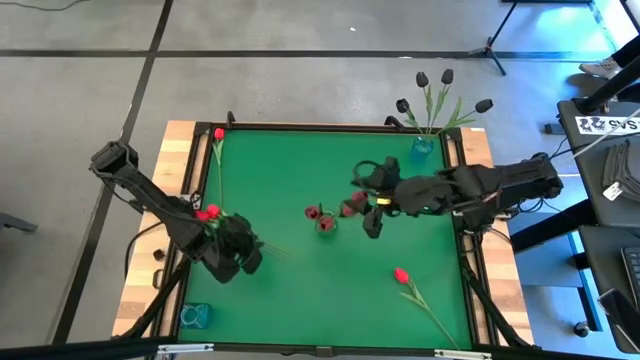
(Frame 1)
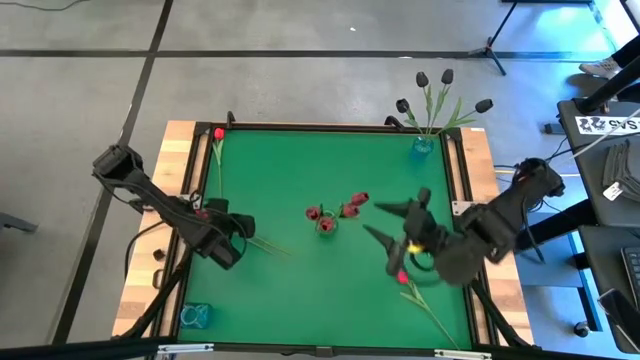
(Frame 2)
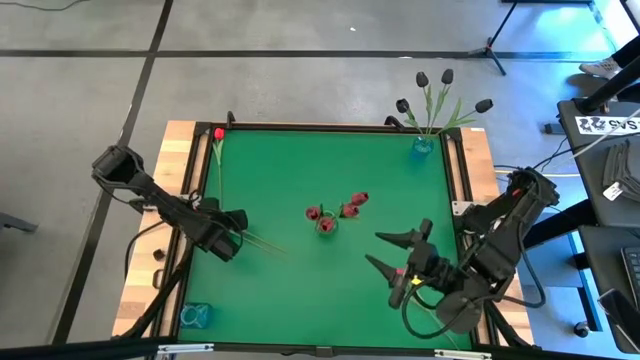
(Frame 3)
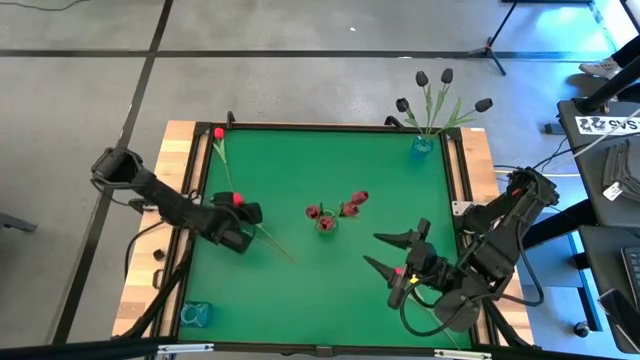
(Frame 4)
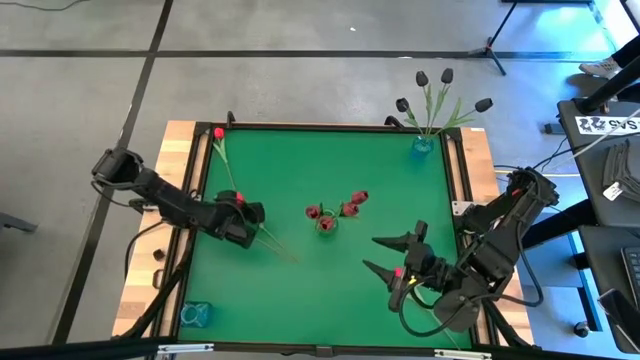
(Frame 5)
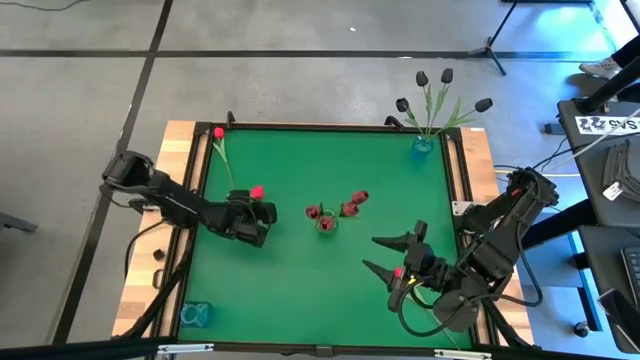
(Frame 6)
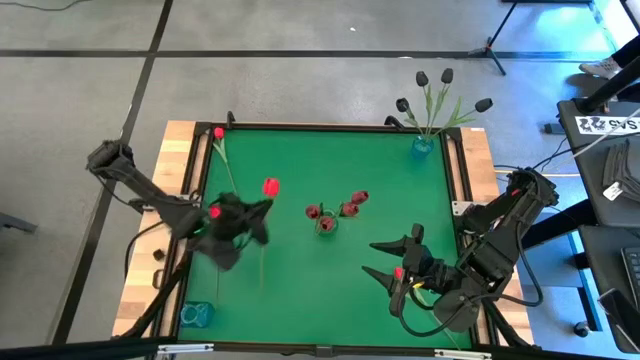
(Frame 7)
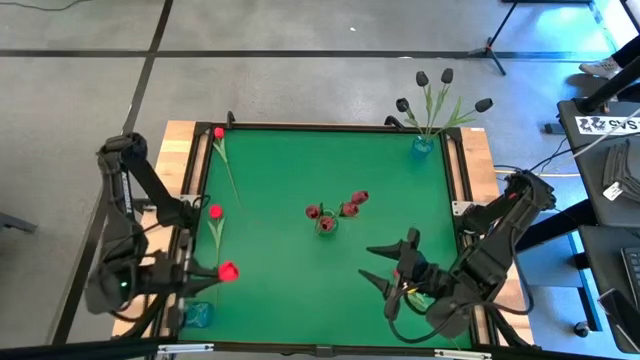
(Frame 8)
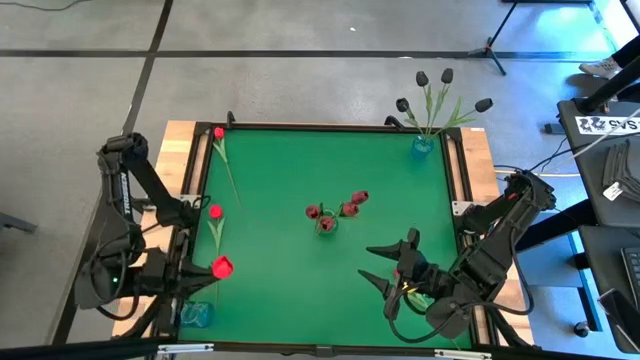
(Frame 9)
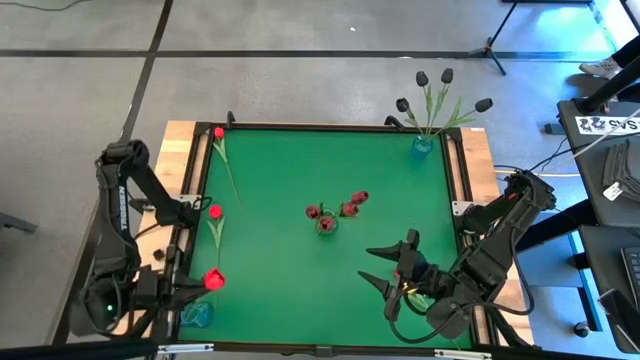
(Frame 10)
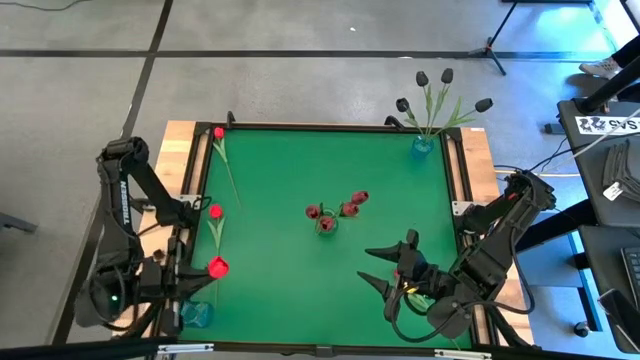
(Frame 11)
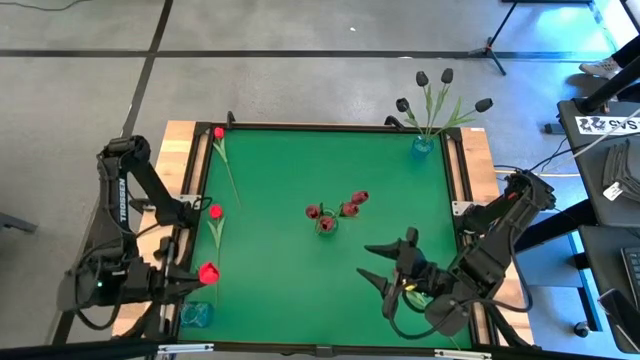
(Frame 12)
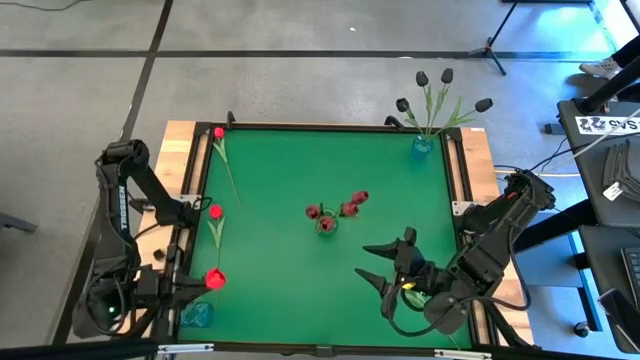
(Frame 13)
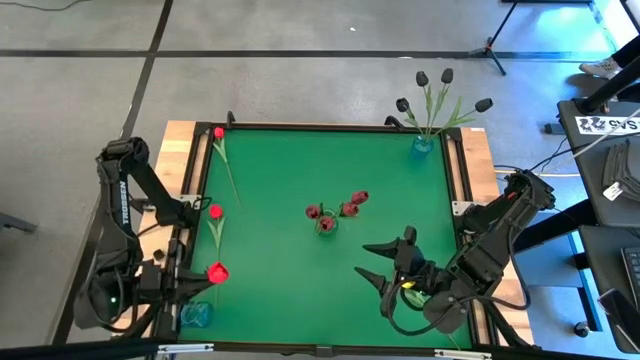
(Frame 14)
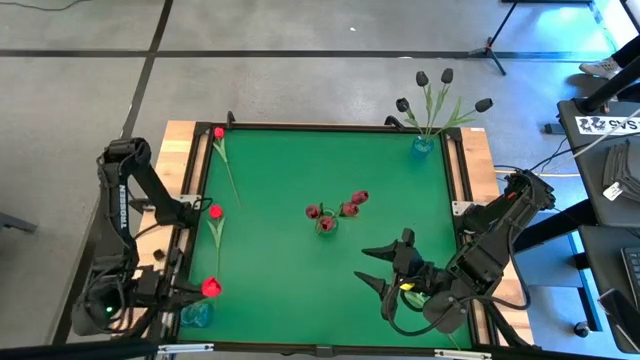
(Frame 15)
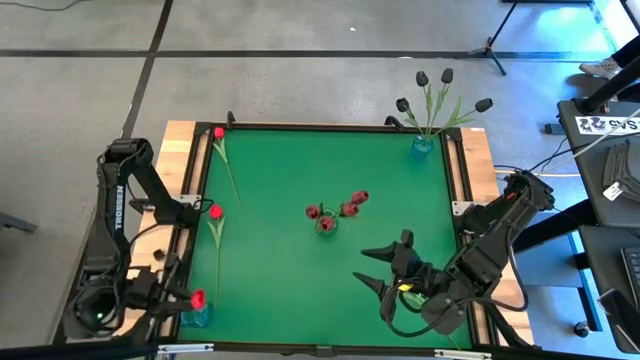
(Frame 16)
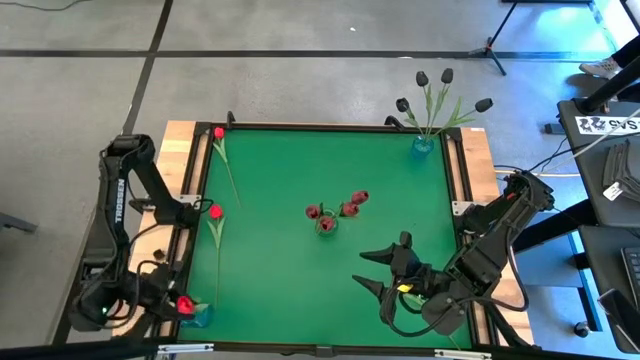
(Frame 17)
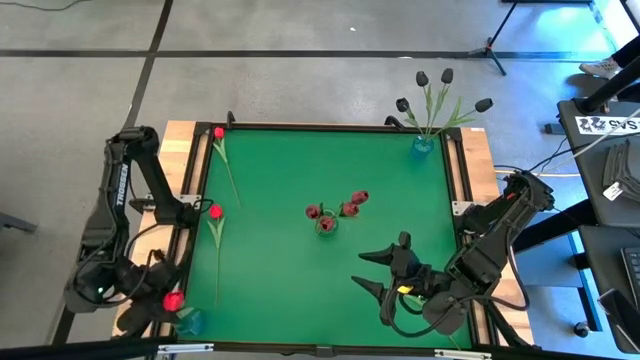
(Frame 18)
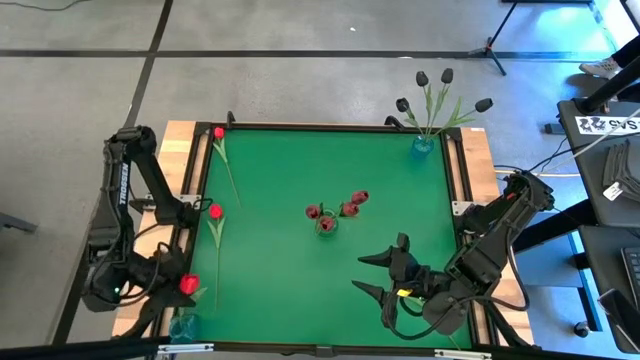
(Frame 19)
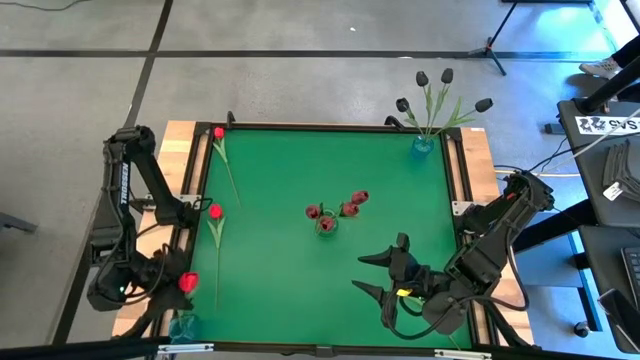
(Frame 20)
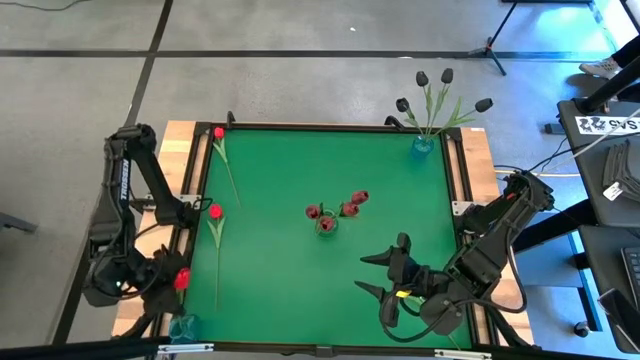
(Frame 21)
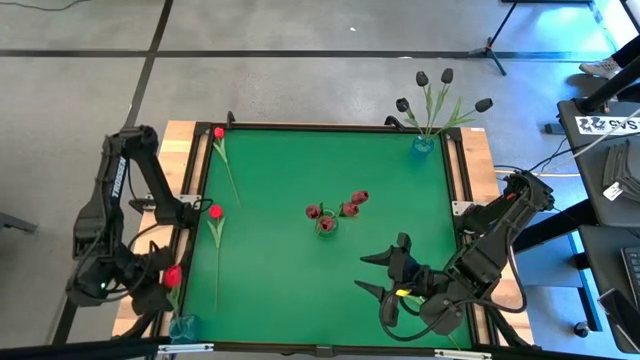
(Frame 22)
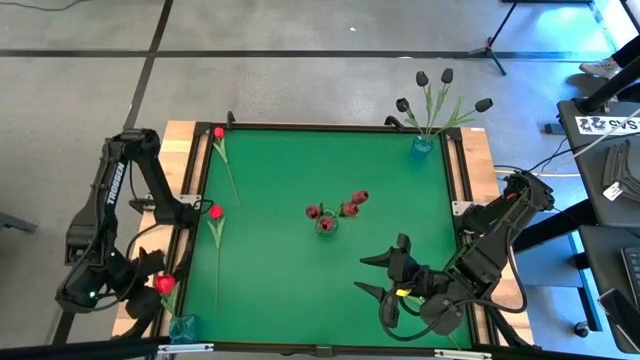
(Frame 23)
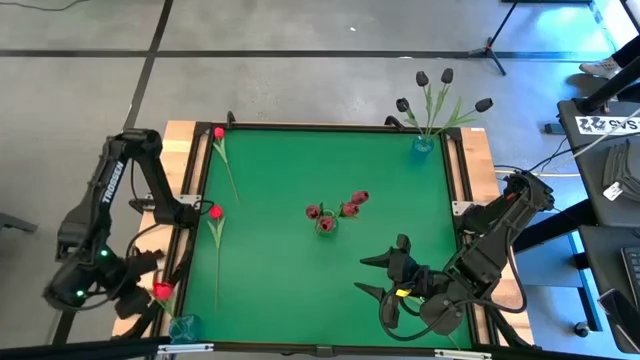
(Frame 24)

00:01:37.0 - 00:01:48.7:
Task: Sort flowers into vase by color
Put the middle left red flower into the bottom left blue vase

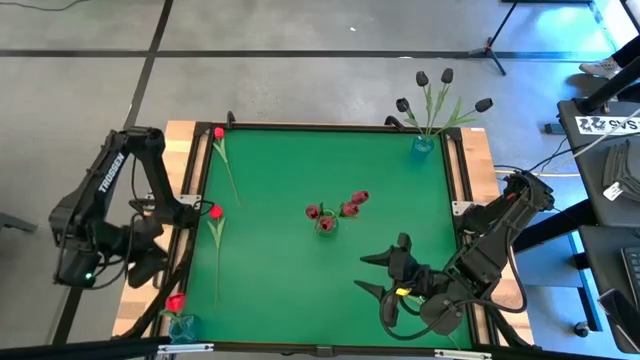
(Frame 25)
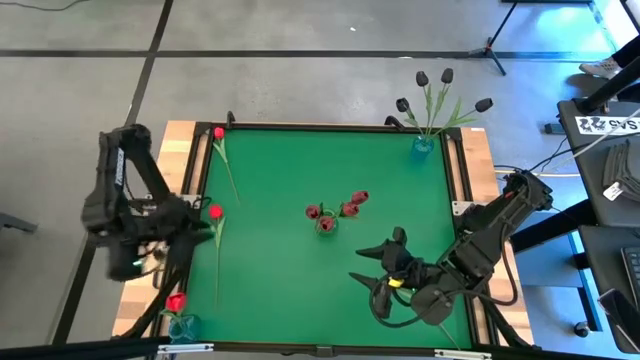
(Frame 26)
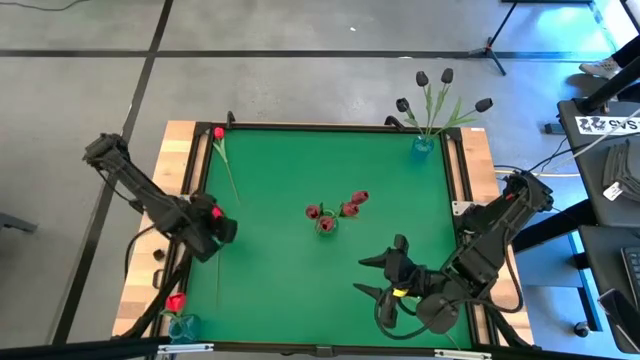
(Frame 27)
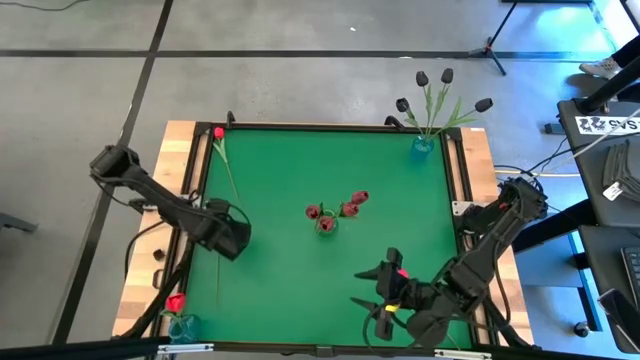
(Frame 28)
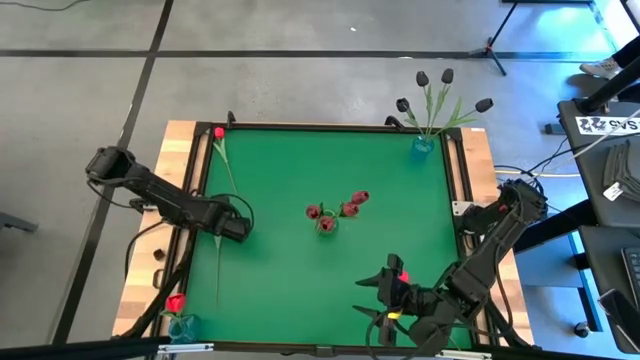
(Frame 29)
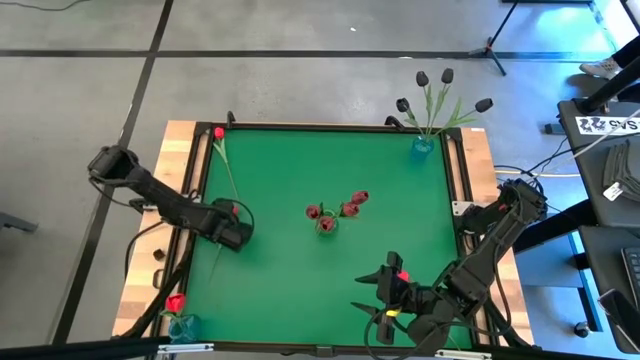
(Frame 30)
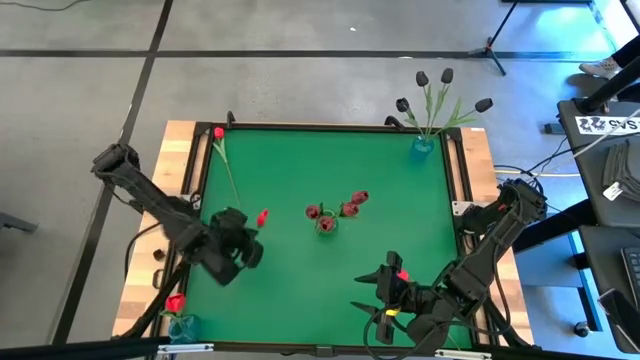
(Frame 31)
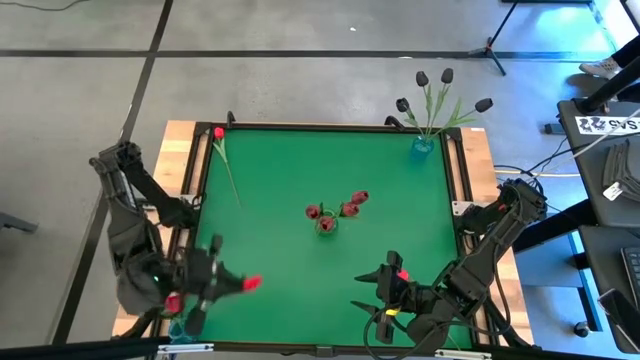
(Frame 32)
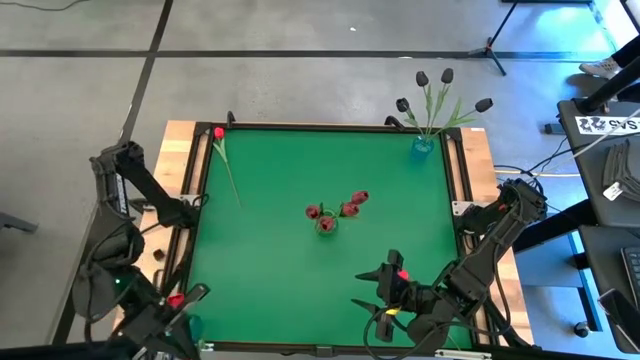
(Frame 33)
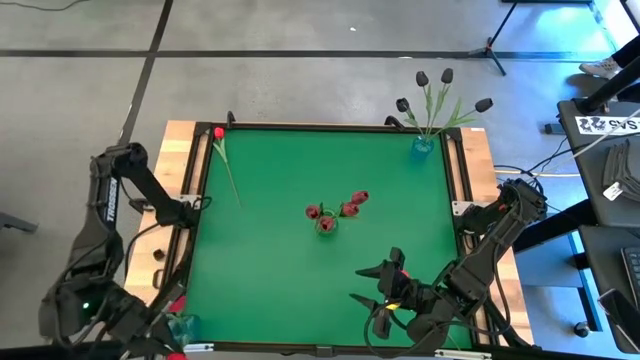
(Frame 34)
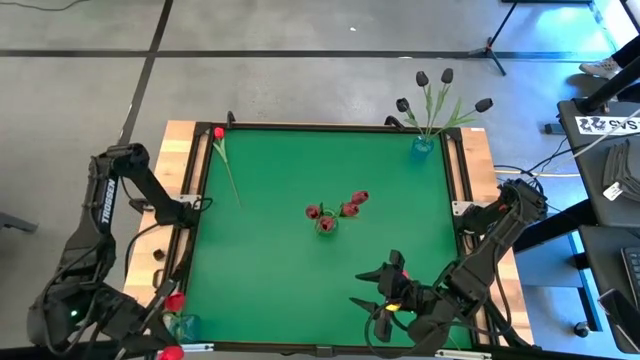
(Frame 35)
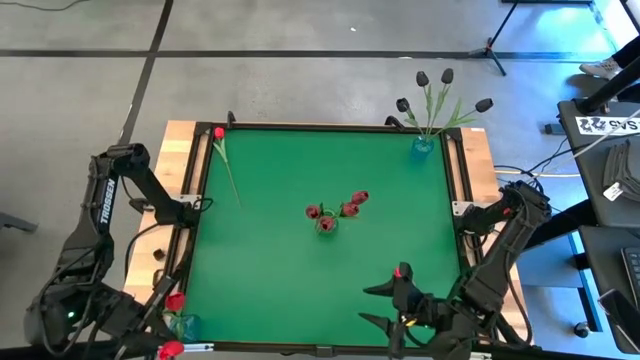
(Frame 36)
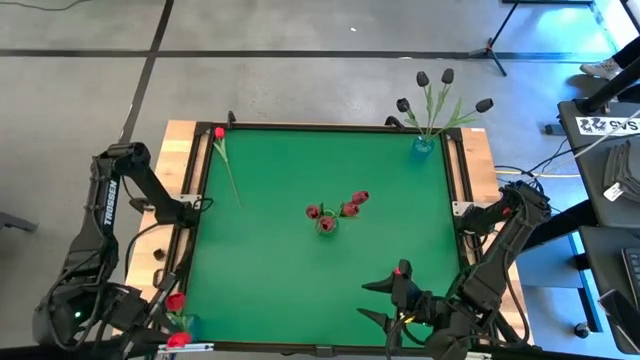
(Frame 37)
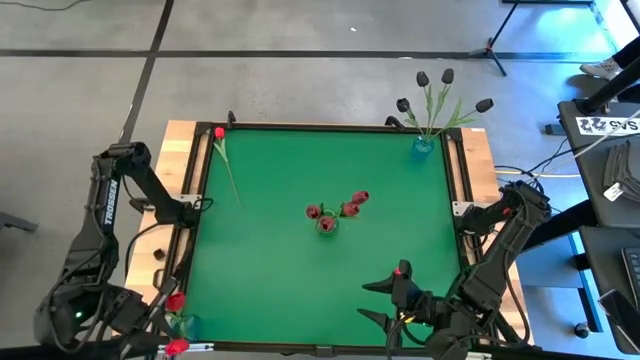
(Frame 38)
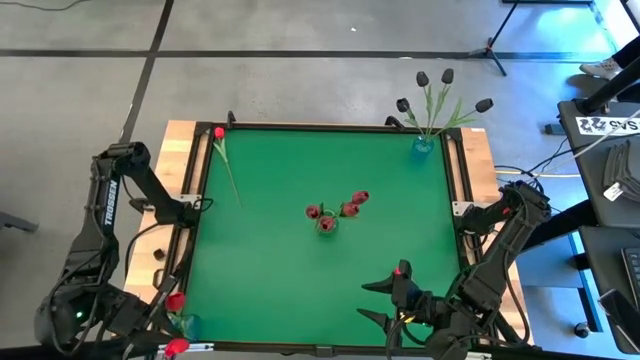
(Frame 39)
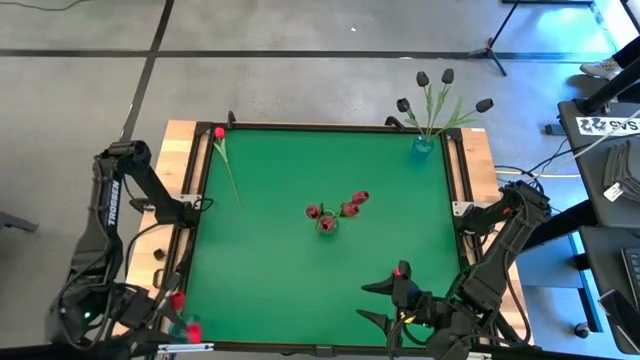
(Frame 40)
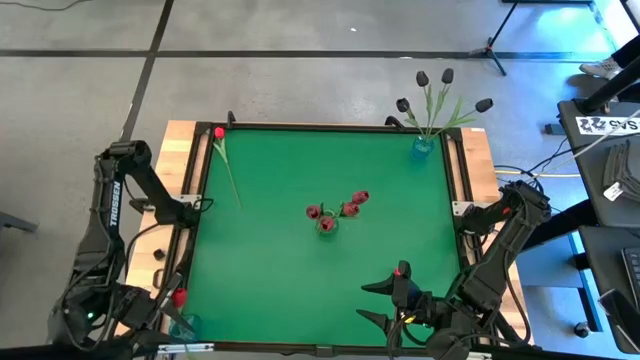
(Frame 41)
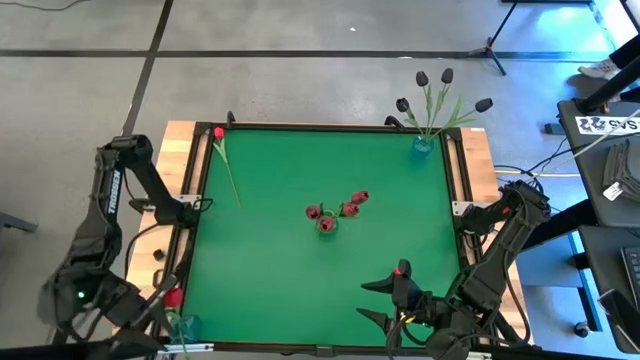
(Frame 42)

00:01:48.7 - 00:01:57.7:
Put the bottom left red flower into the bottom left blue vase

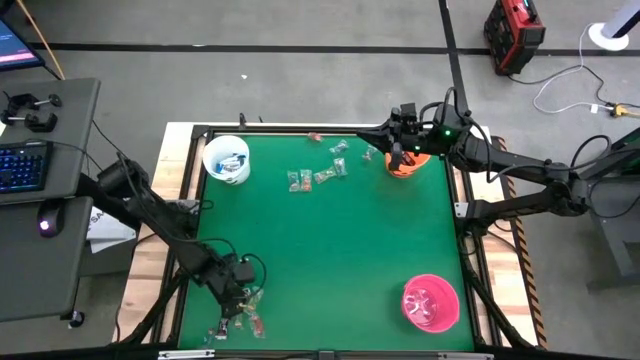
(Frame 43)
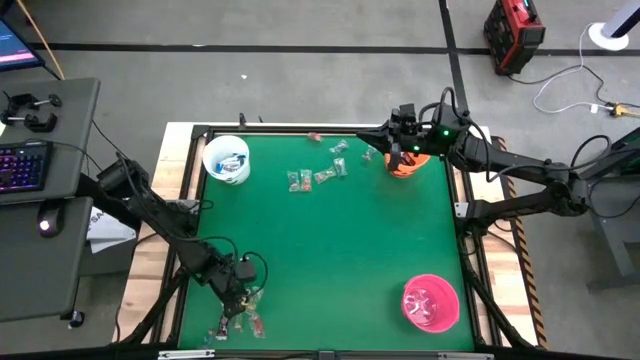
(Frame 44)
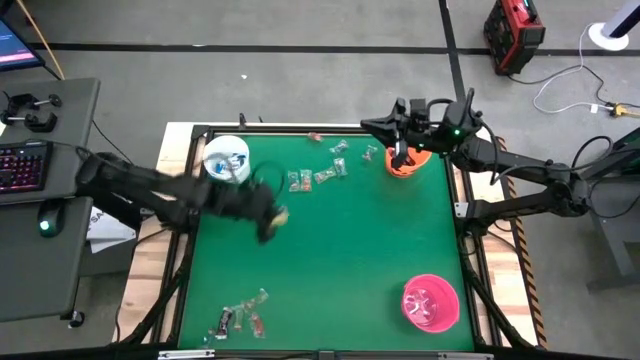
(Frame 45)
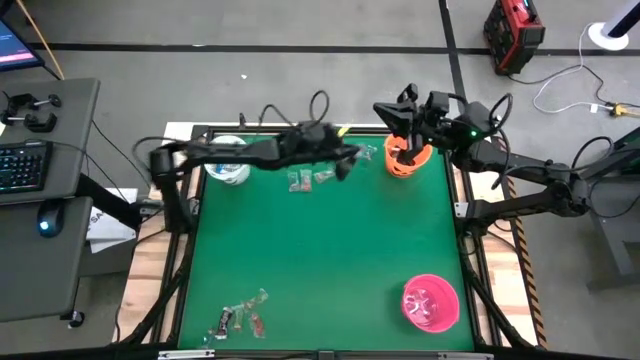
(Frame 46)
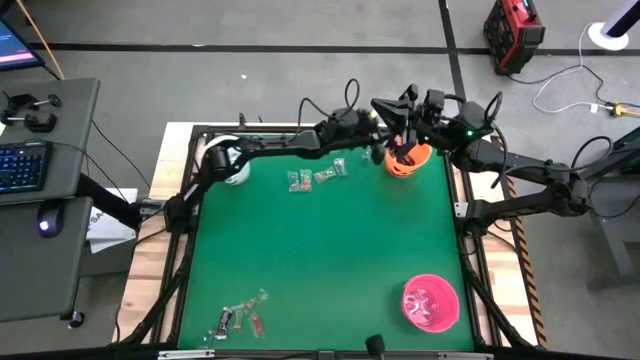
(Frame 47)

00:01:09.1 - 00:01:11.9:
Task: Sort candy by brand, put in halloween buckets
Put the brown chocolate bar into the orange bucket
